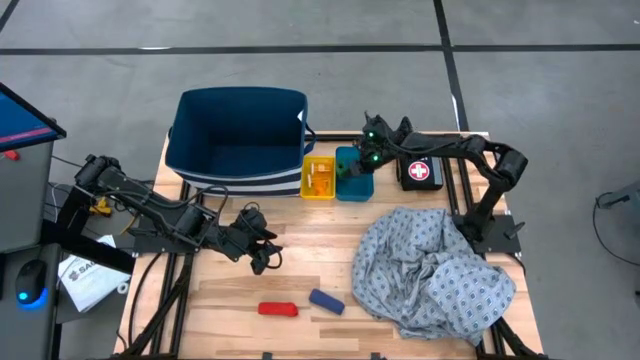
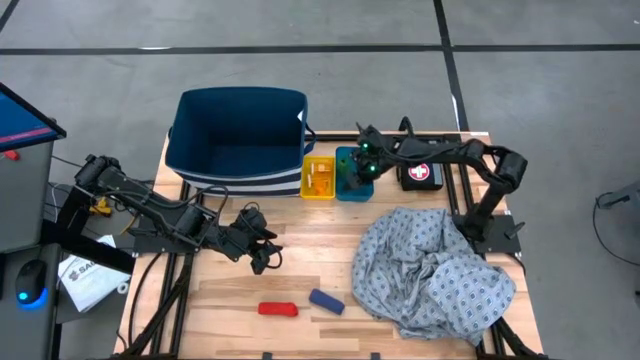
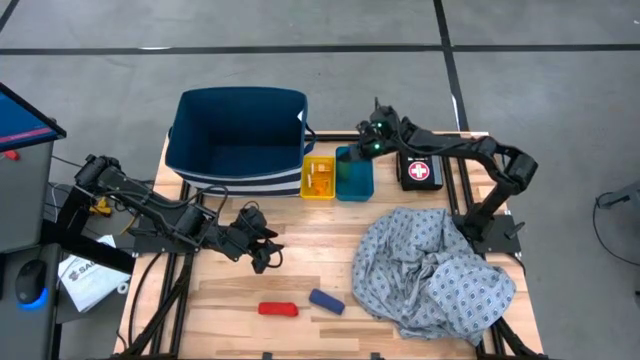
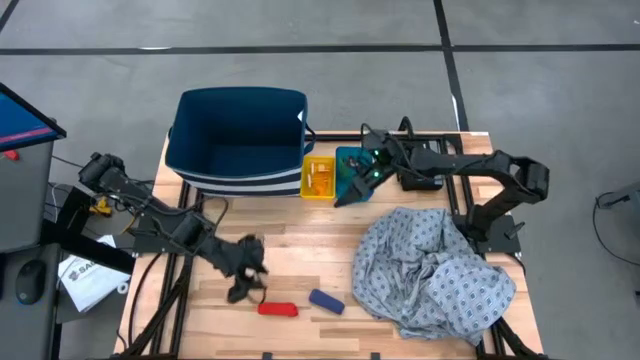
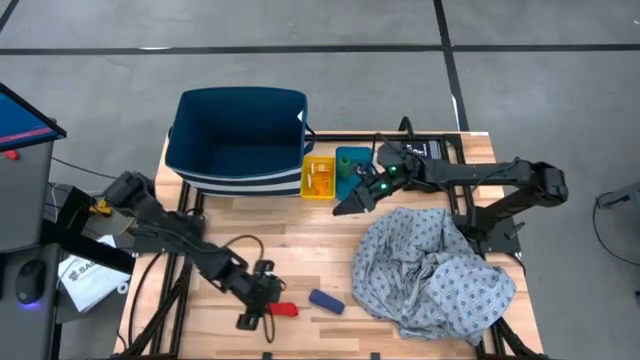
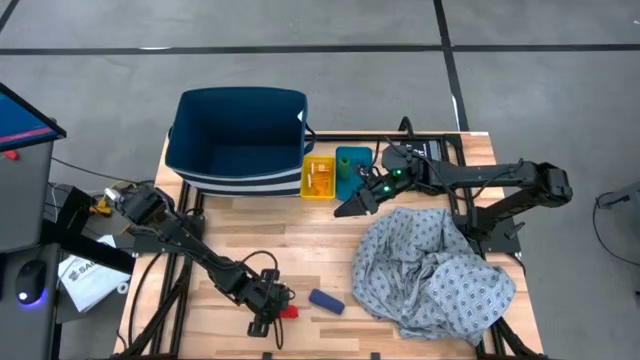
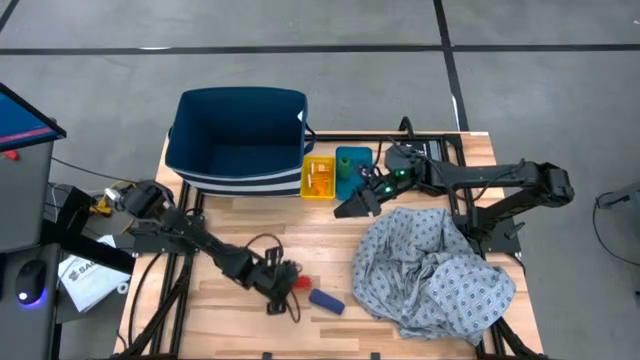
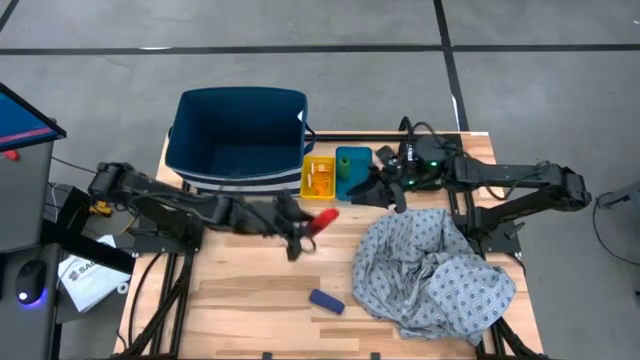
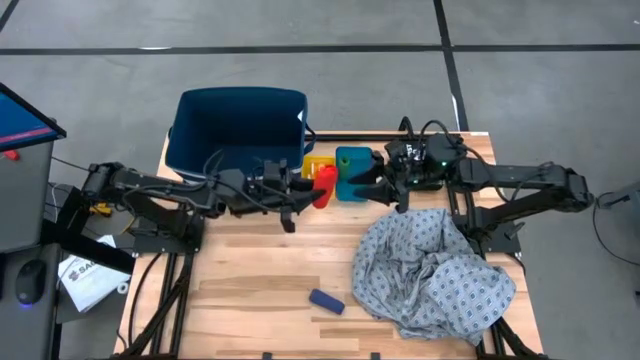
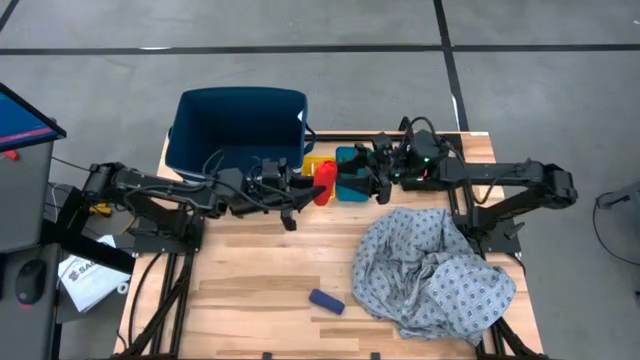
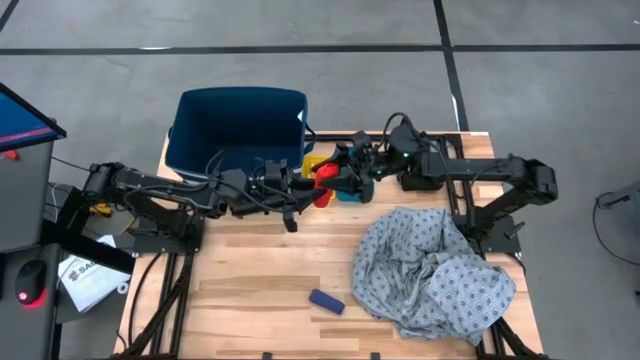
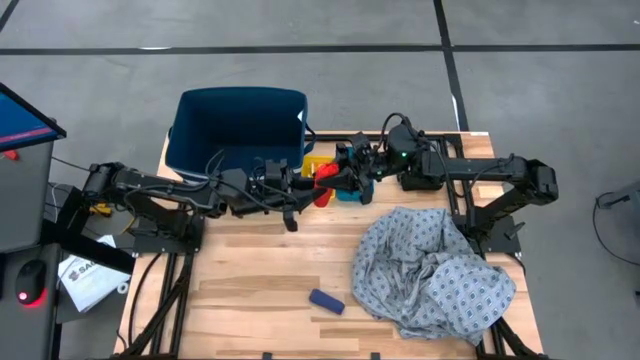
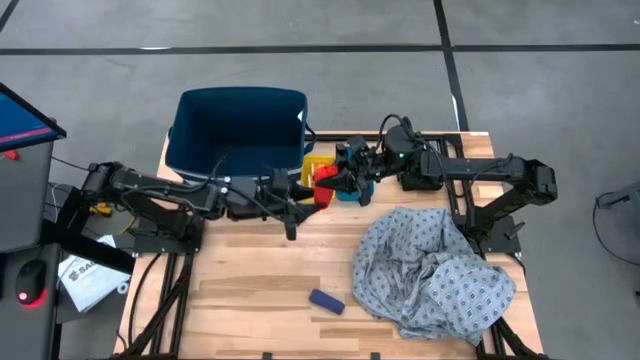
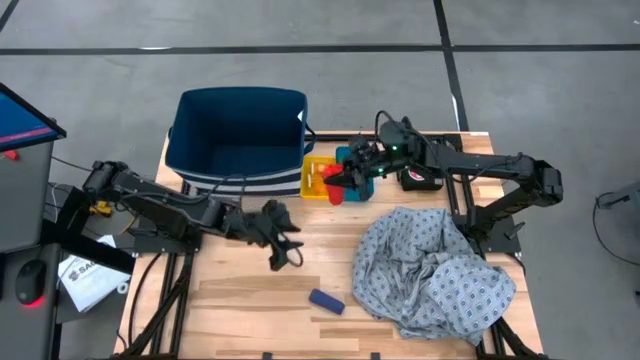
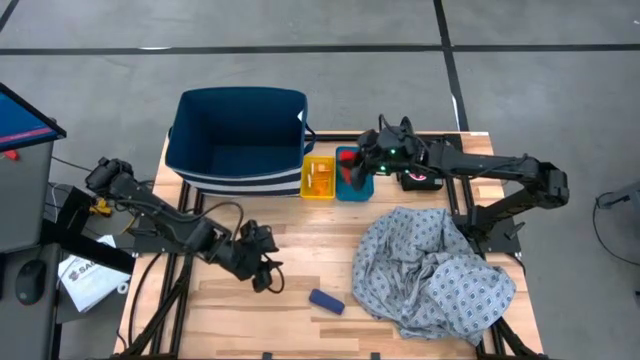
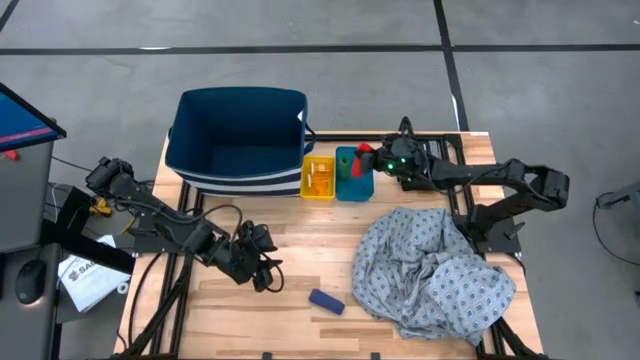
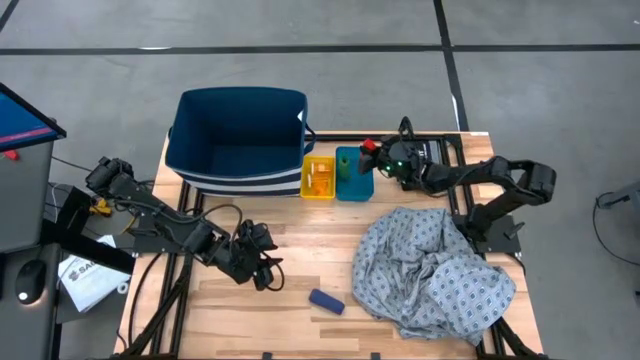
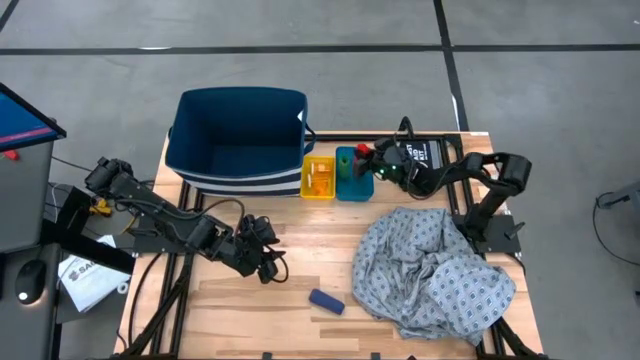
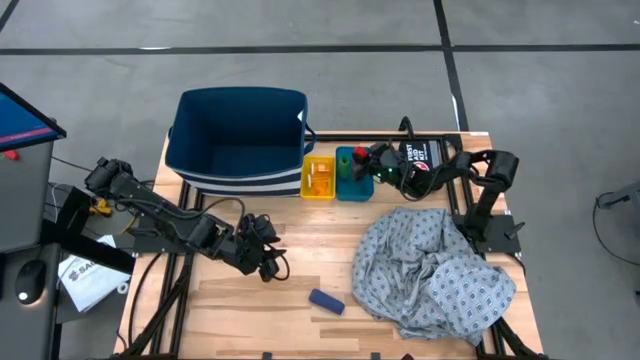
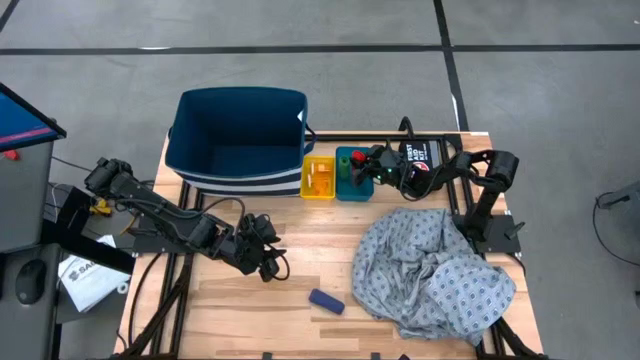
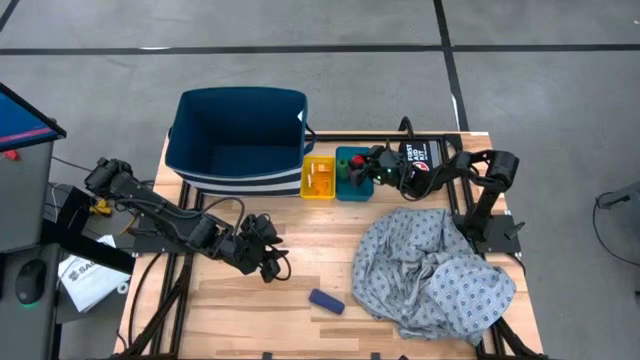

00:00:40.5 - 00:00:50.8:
Task: Pick & place medical supplies in basket/bin
Put the red bandage into the right blue bin

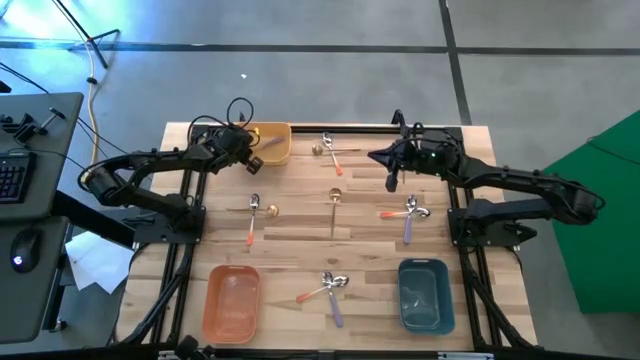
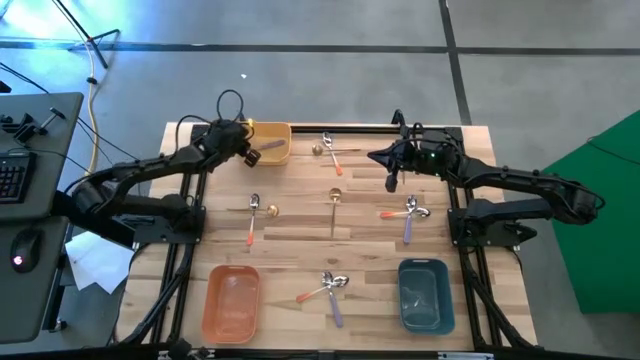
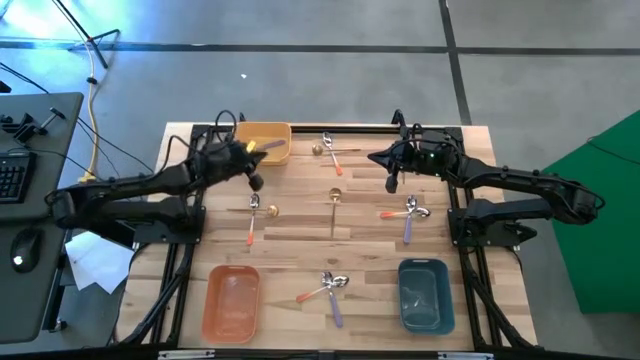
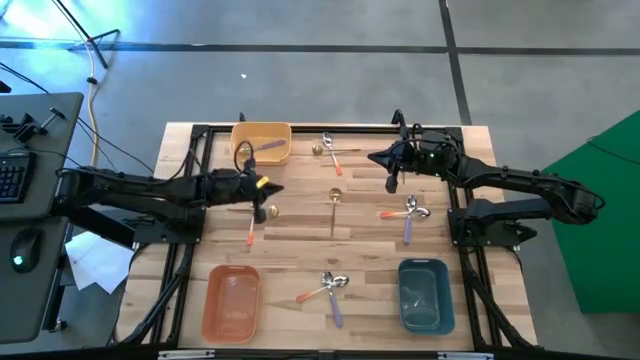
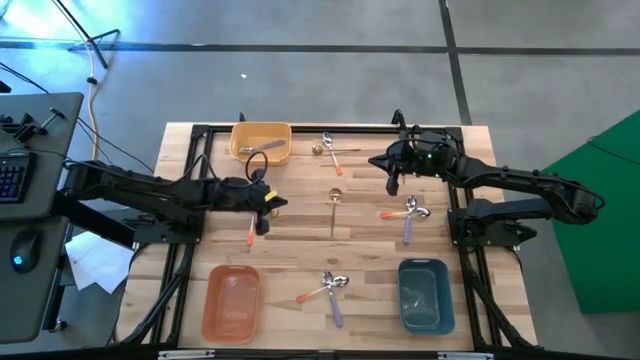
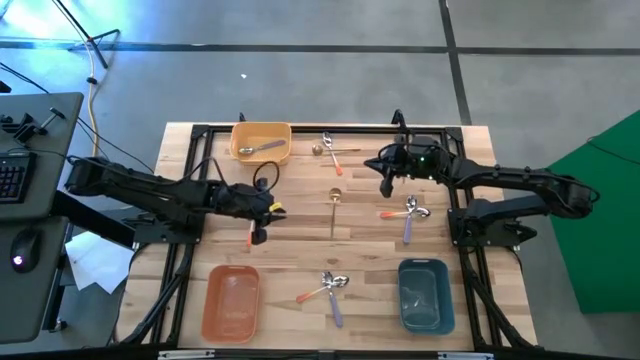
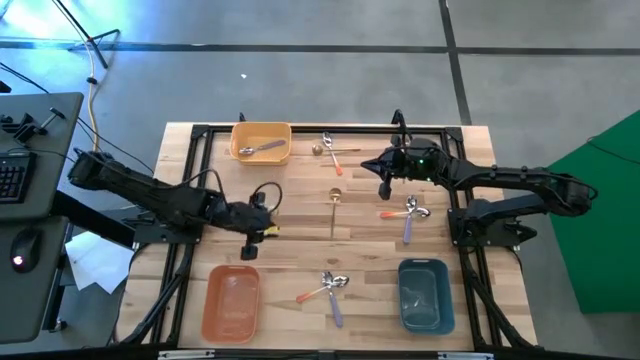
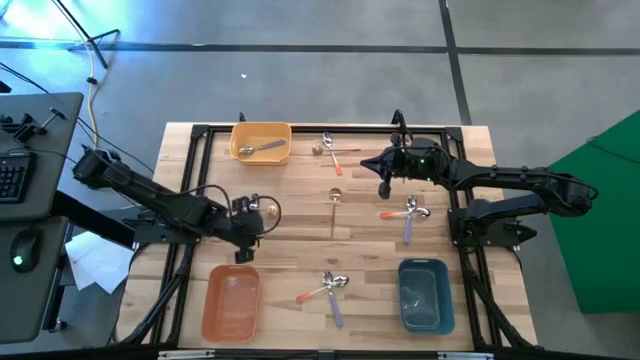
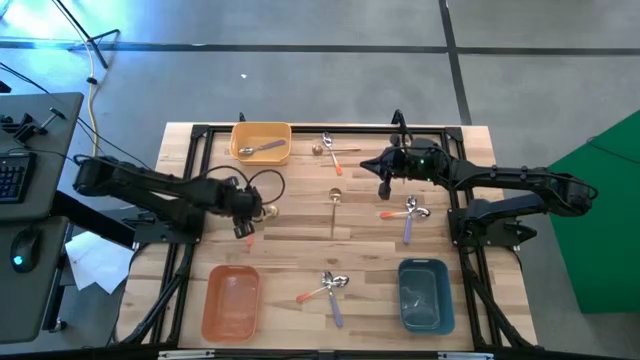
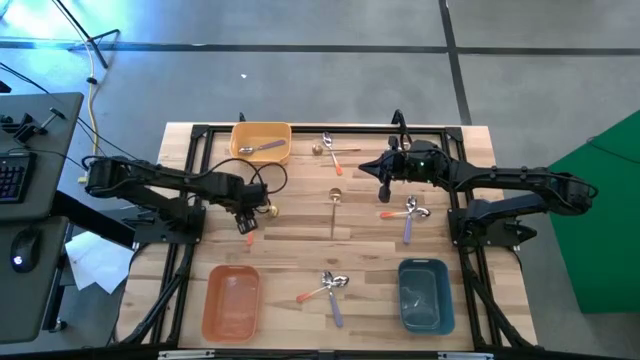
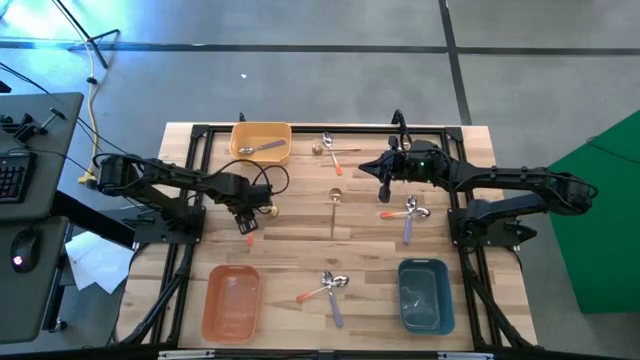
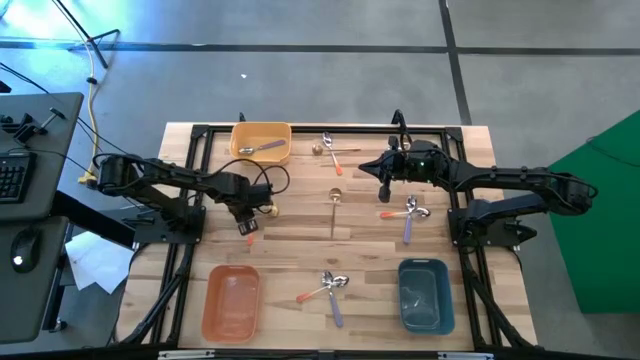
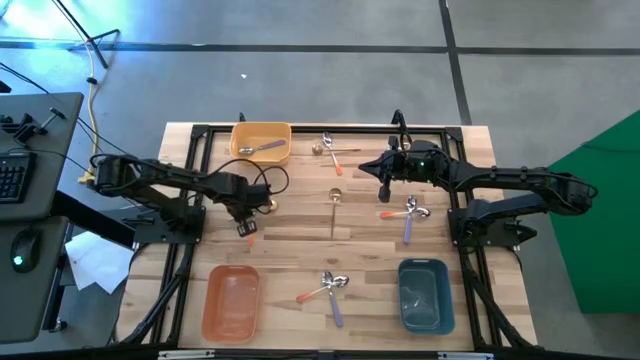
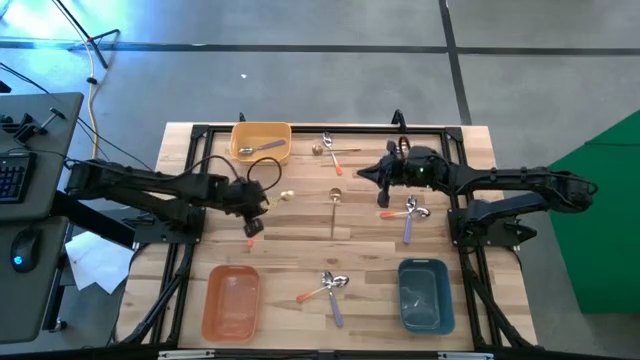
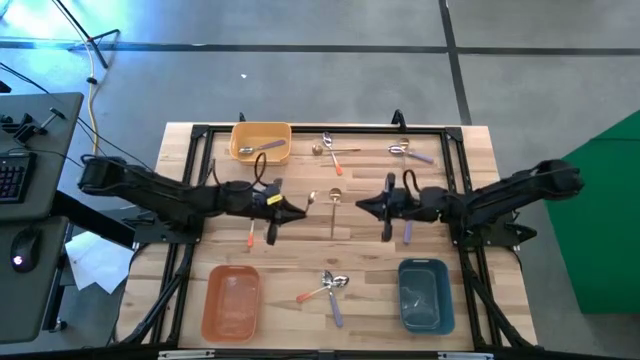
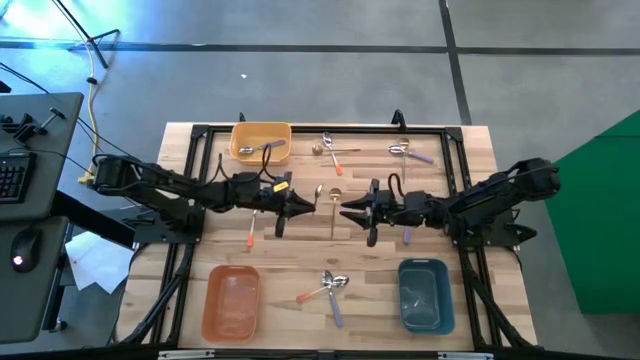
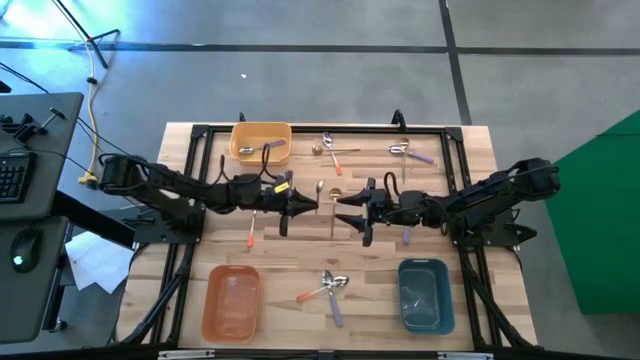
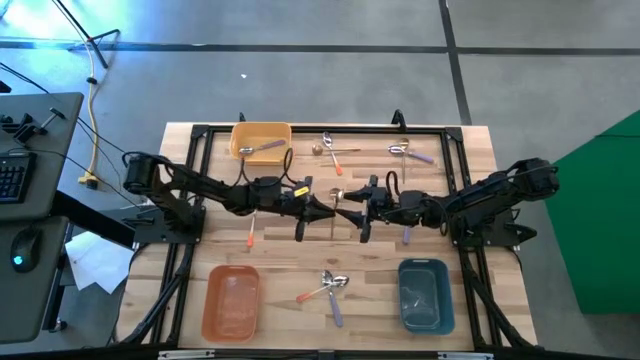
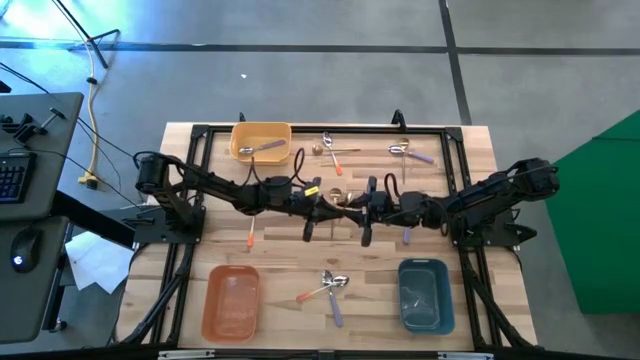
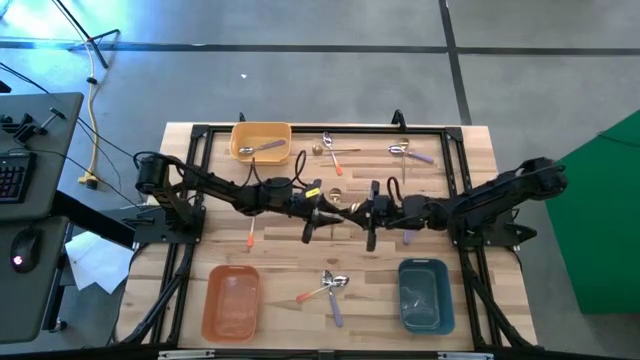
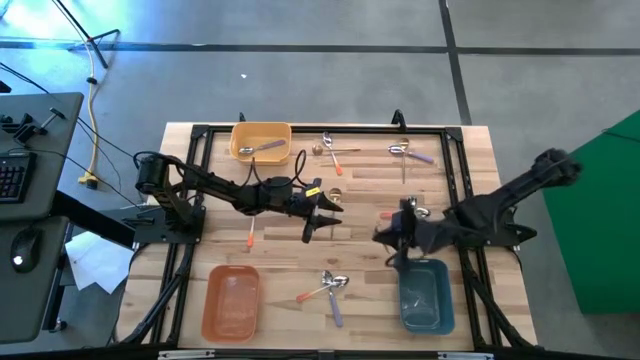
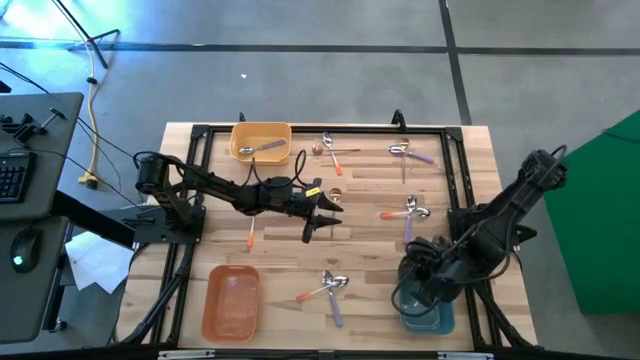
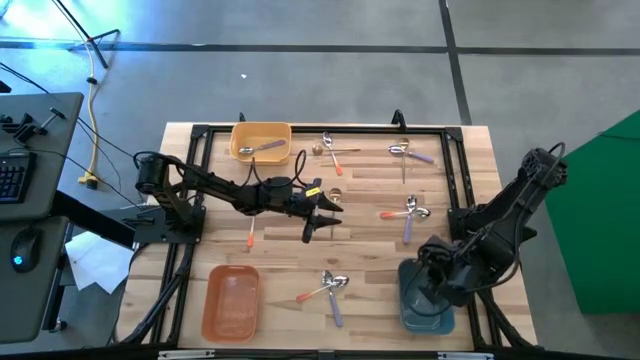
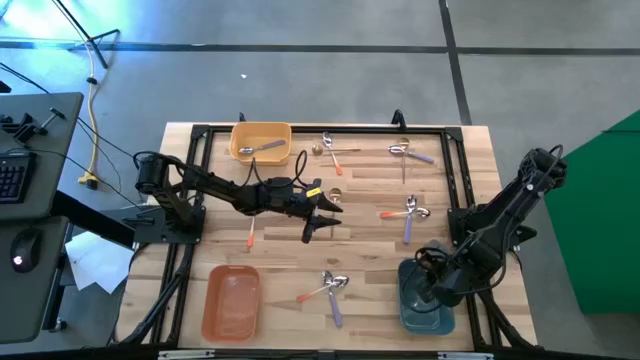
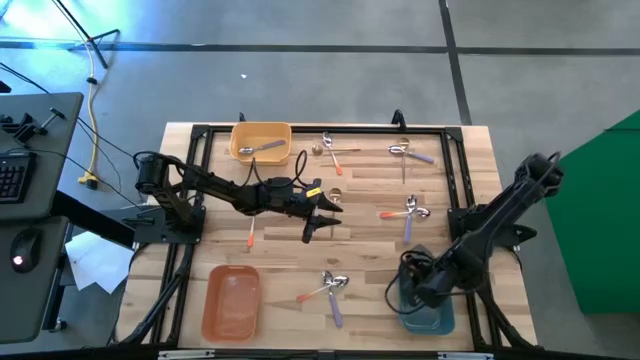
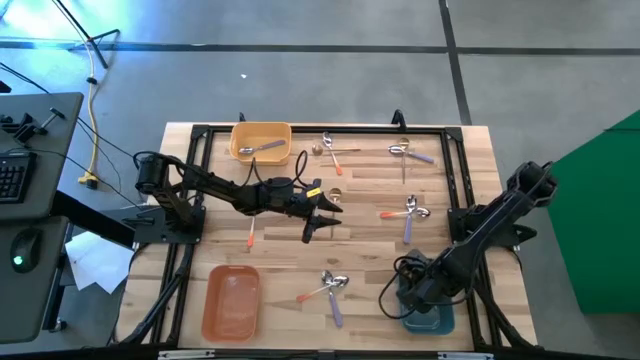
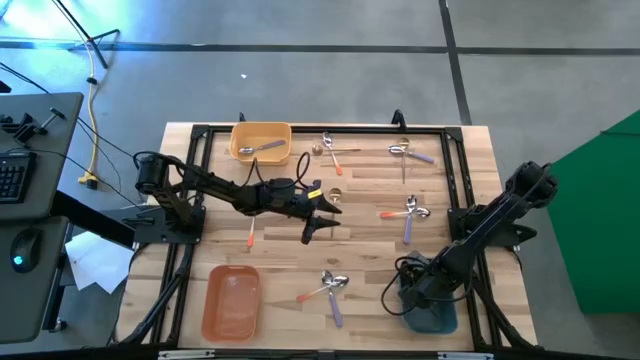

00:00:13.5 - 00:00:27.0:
Task: Sort silverware by color (type)
Put the golden spoon into the blue bin
